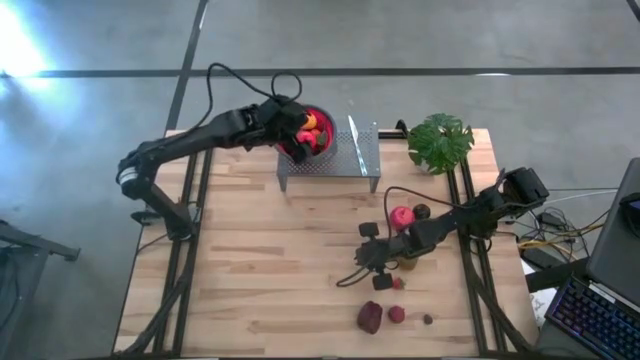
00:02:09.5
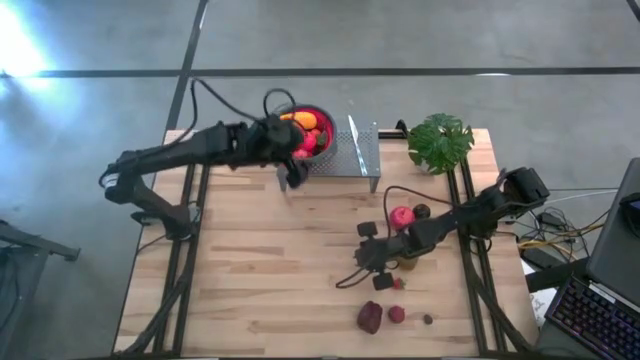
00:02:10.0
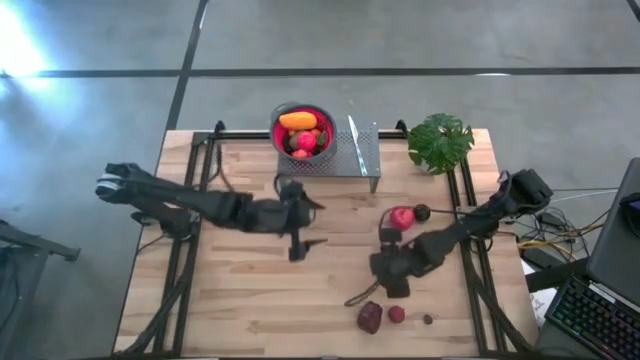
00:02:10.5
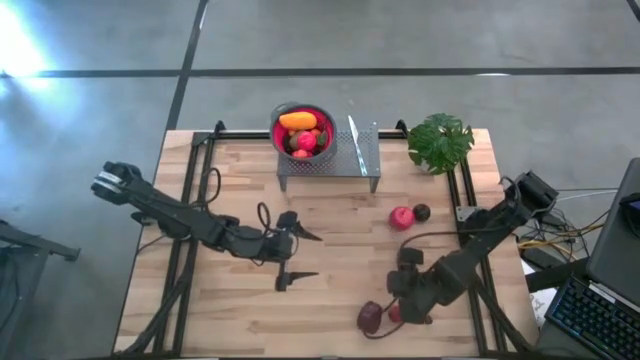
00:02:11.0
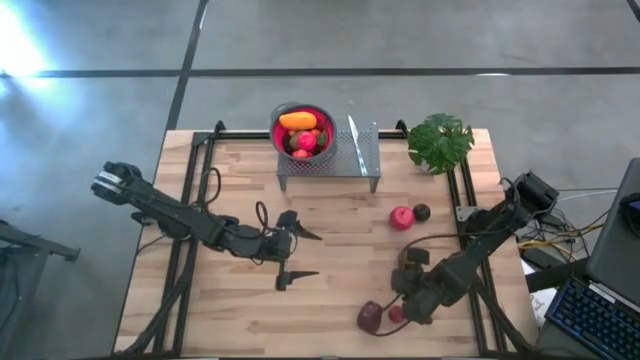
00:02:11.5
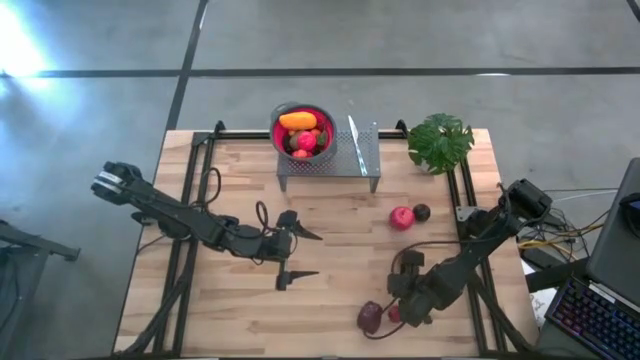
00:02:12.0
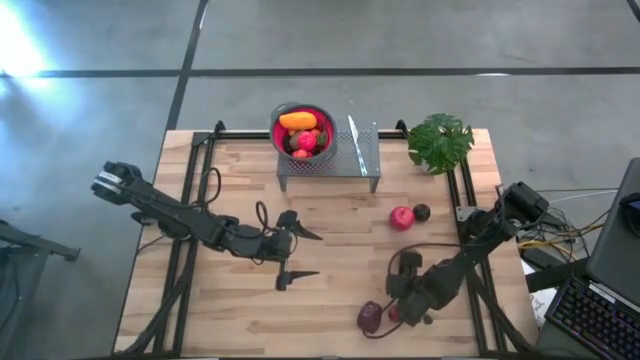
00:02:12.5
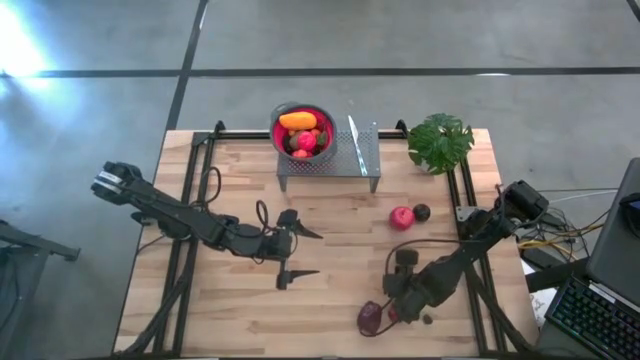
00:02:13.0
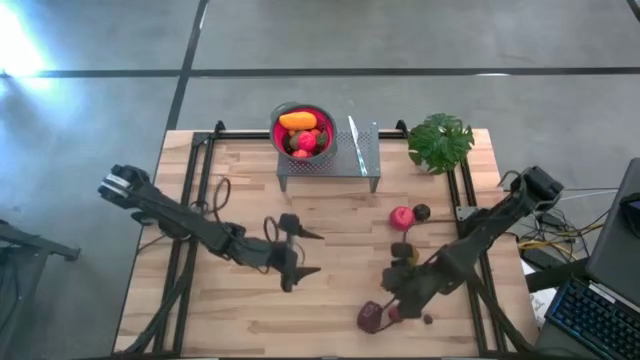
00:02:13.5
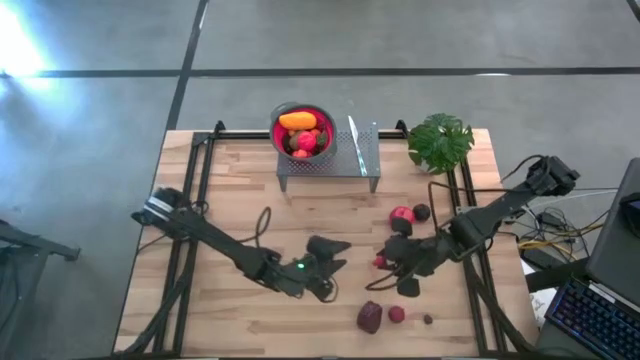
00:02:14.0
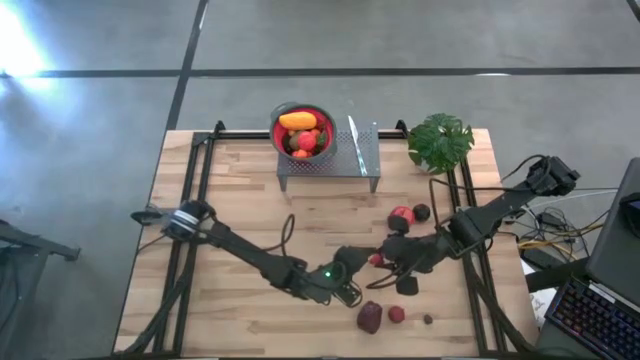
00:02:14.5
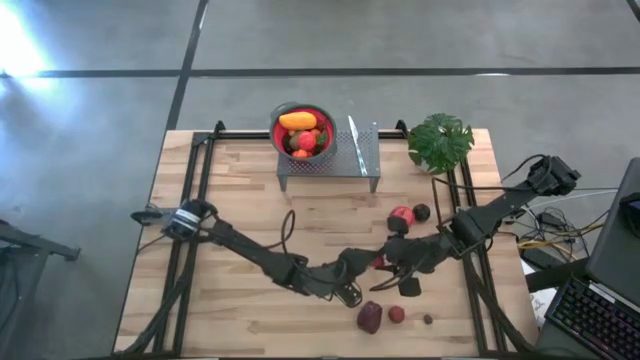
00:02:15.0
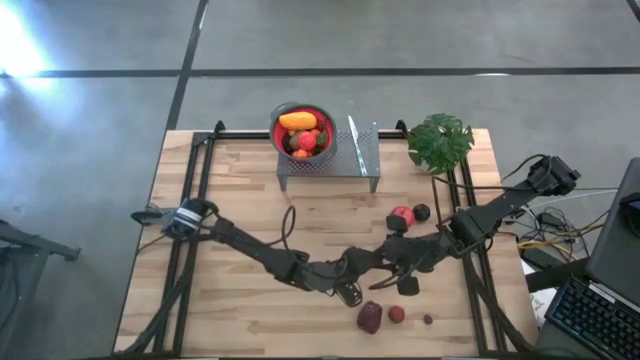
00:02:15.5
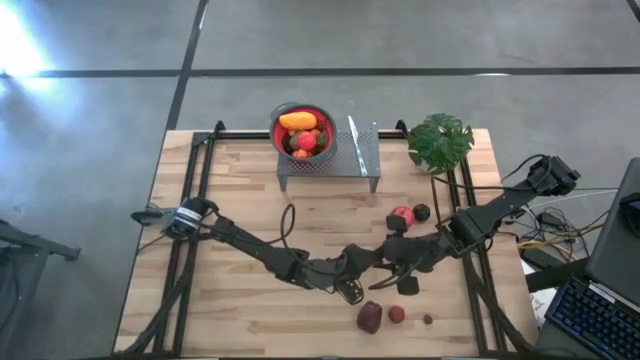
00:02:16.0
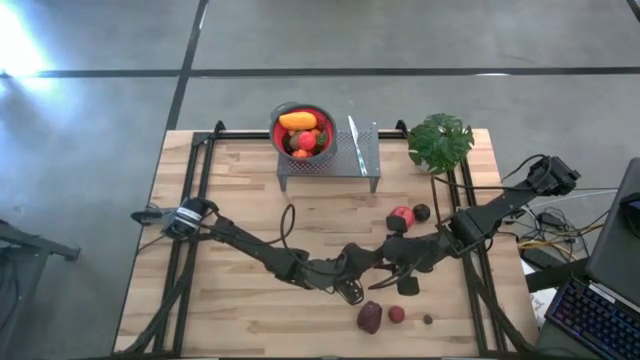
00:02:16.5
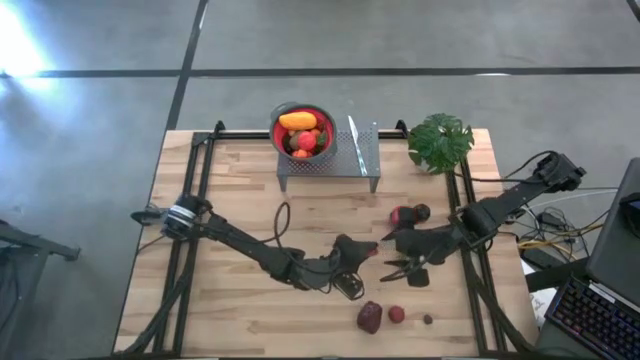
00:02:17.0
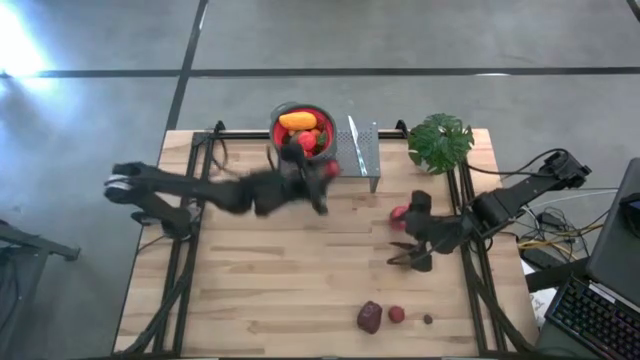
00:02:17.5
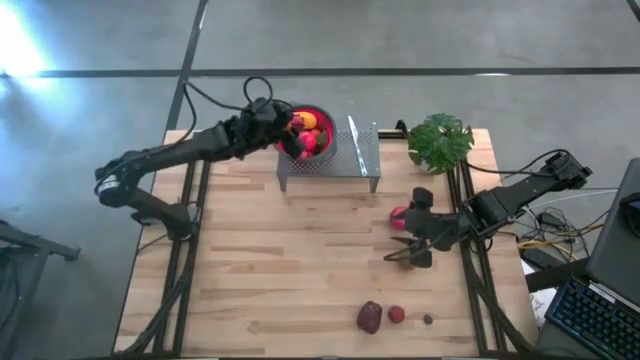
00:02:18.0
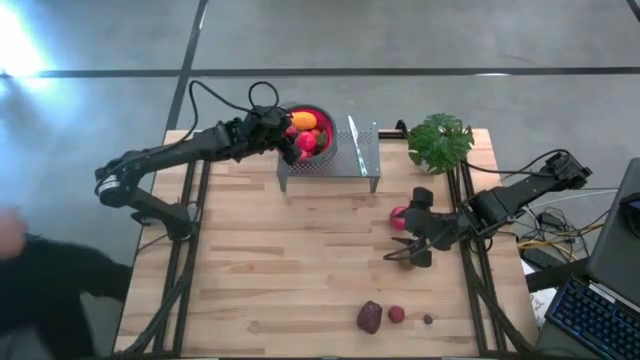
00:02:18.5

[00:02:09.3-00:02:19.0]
Task: Pick & Place Fruit
Put the red strawberry into the red strainer bowl on the shelf

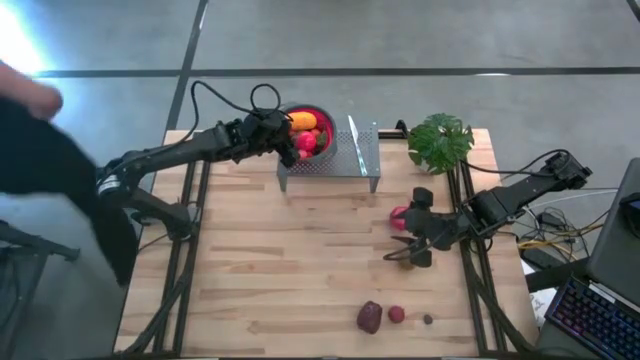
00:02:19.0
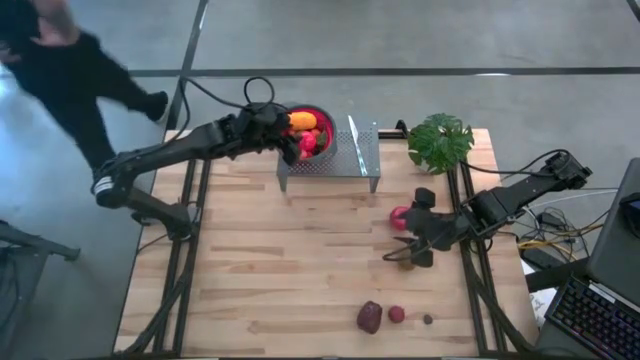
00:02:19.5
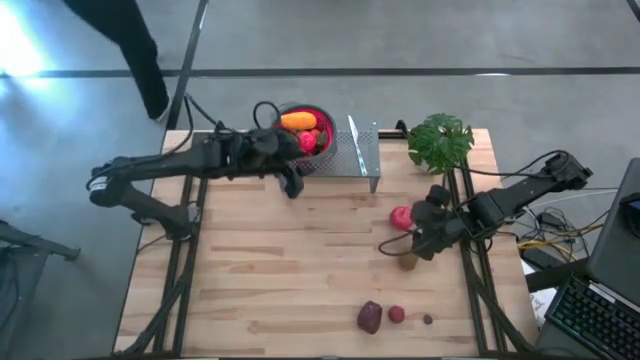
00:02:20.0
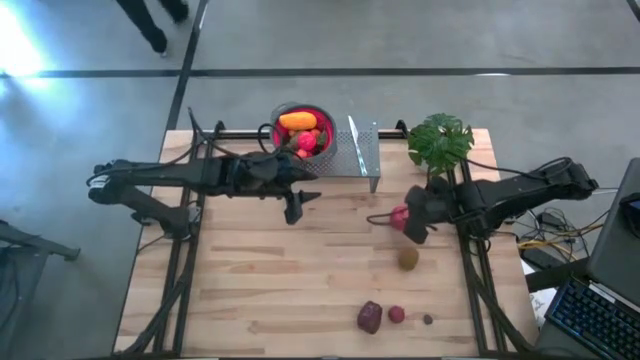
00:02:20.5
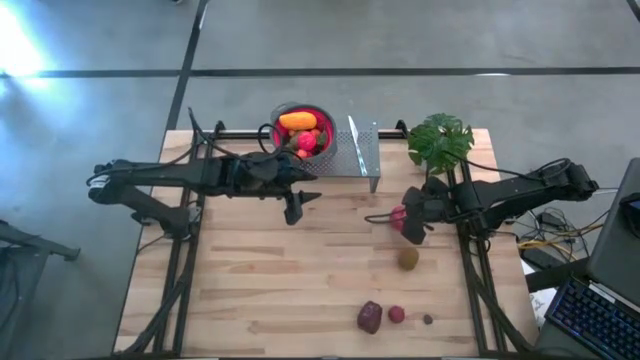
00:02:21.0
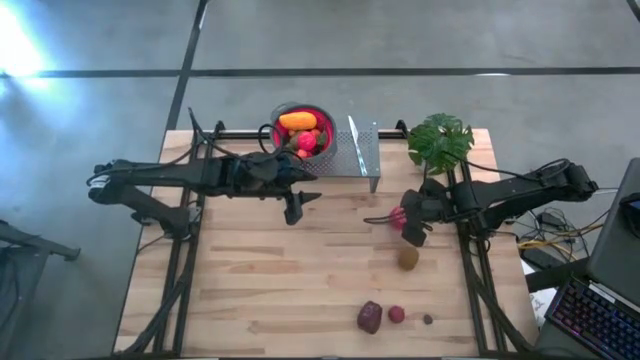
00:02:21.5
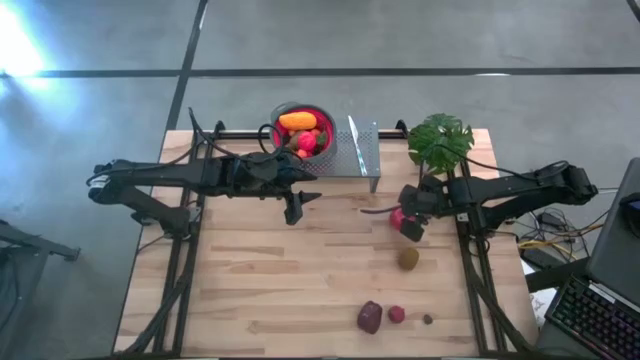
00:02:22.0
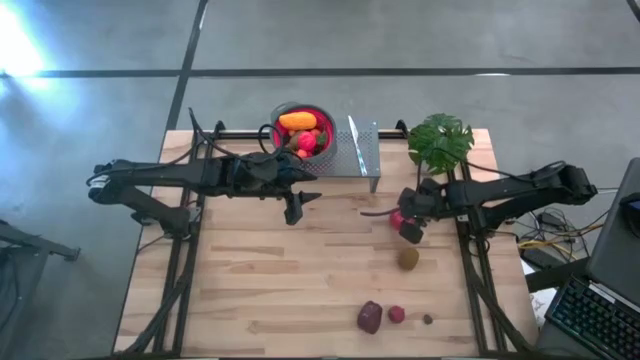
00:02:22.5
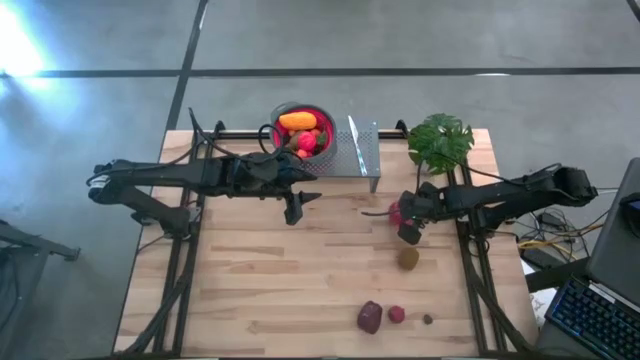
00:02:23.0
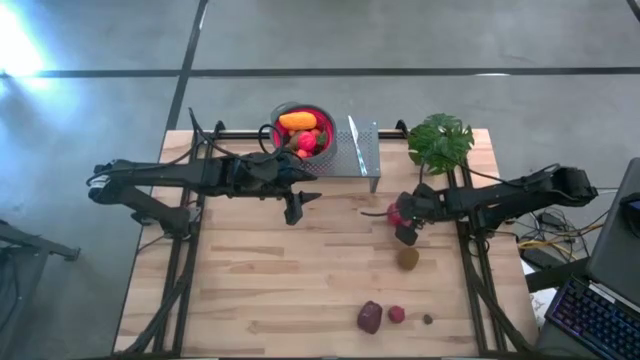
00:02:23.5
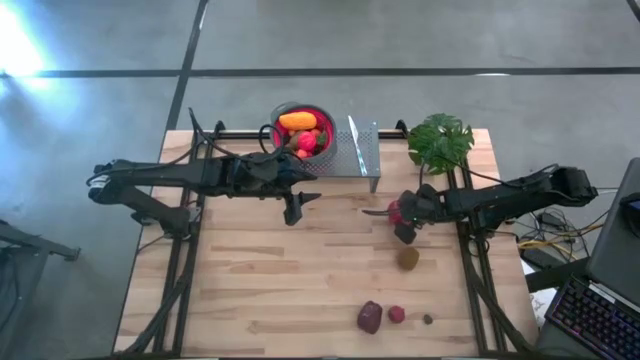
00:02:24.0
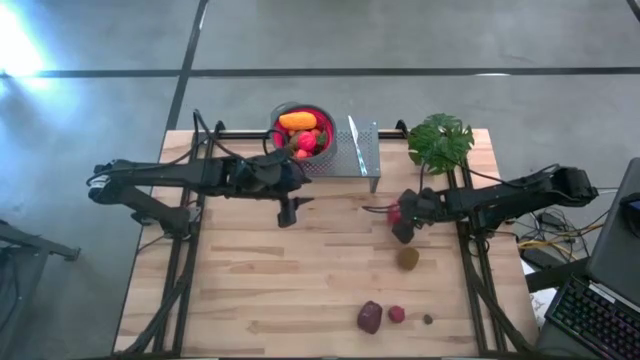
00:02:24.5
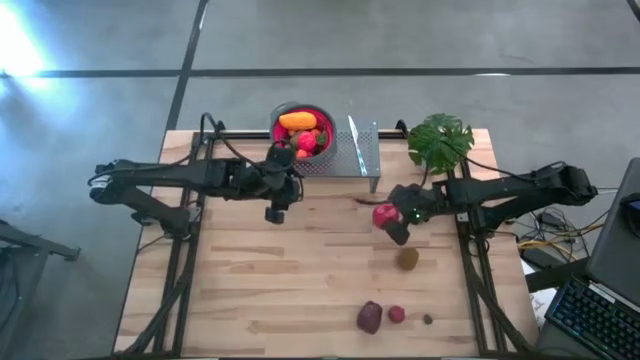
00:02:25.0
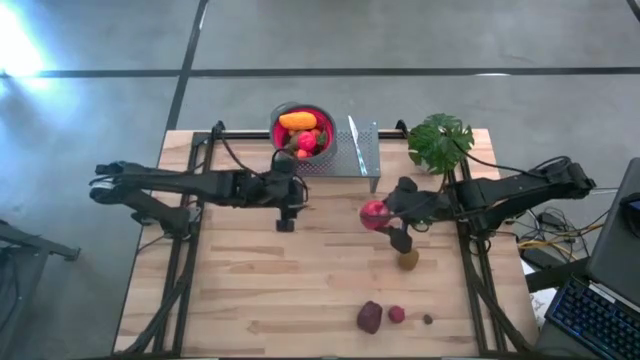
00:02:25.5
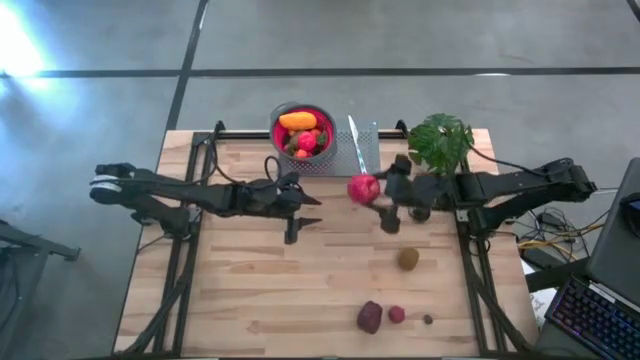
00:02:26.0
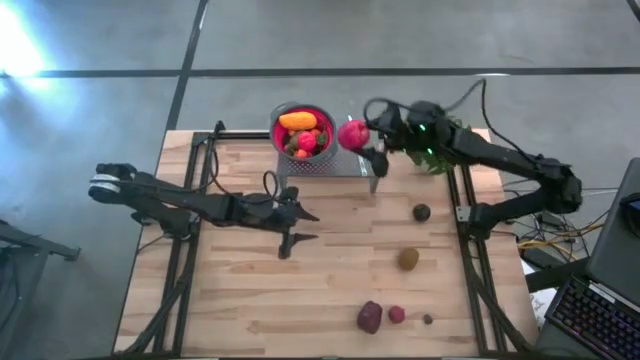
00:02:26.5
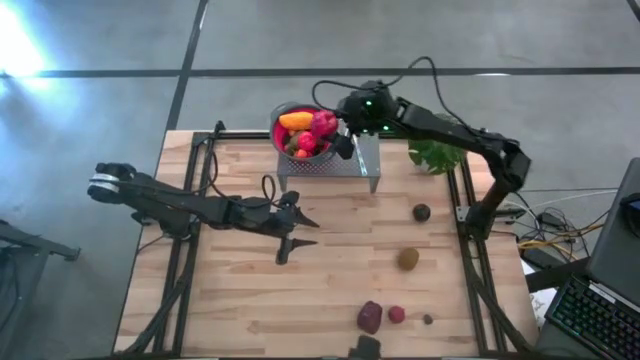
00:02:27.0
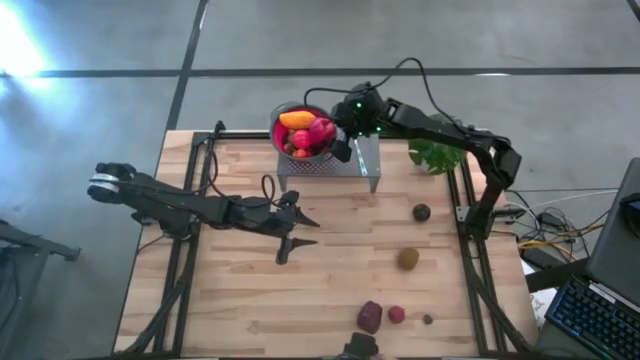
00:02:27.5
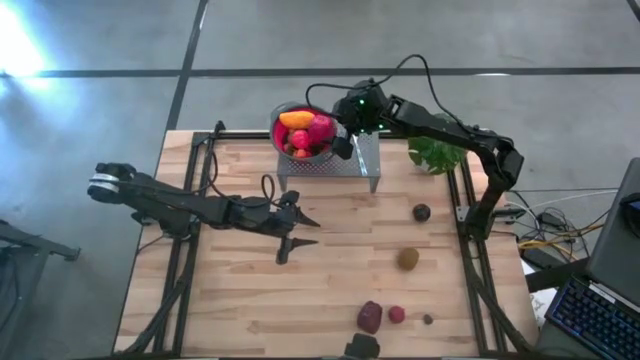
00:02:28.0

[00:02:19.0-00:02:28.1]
Put the red apple into the red strainer bowl on the shelf

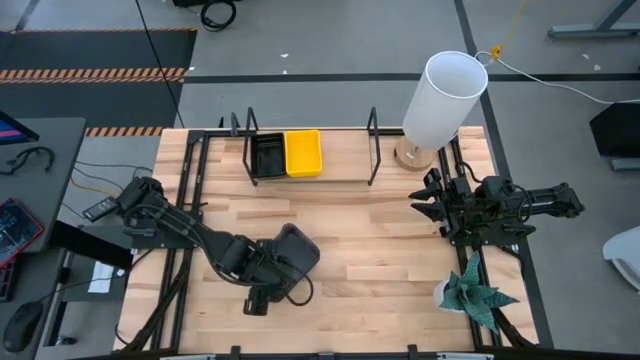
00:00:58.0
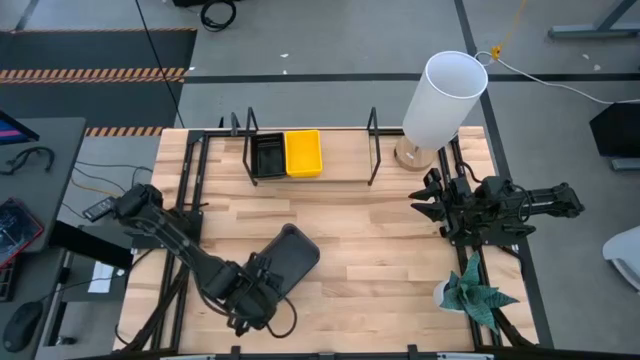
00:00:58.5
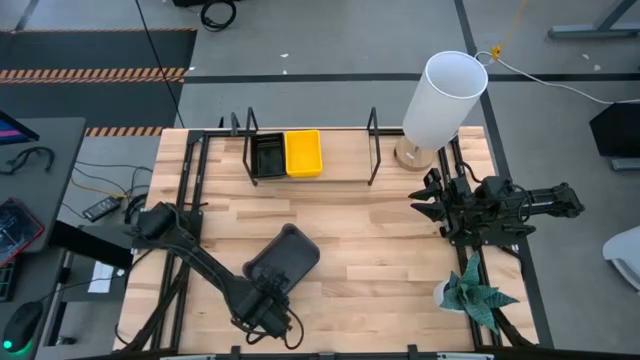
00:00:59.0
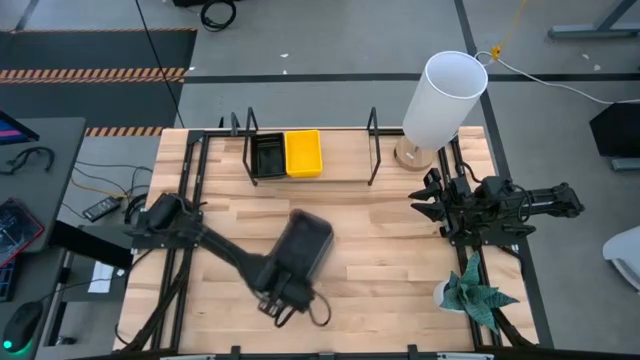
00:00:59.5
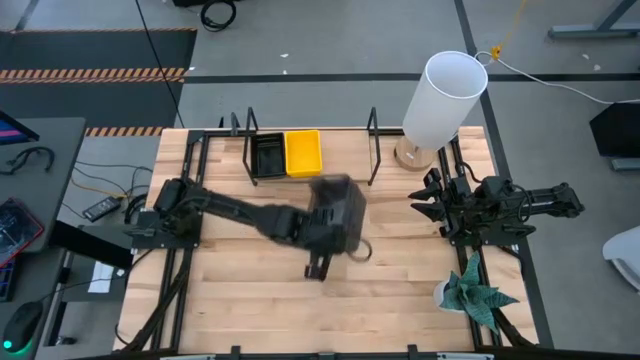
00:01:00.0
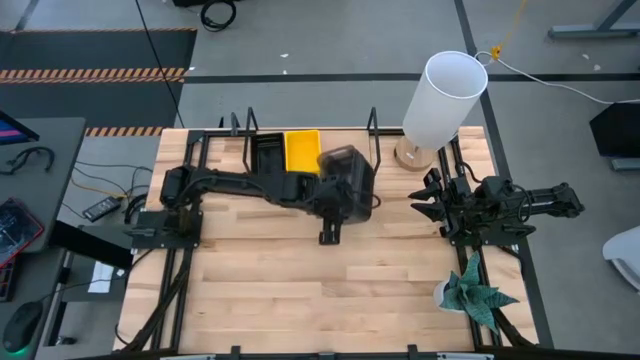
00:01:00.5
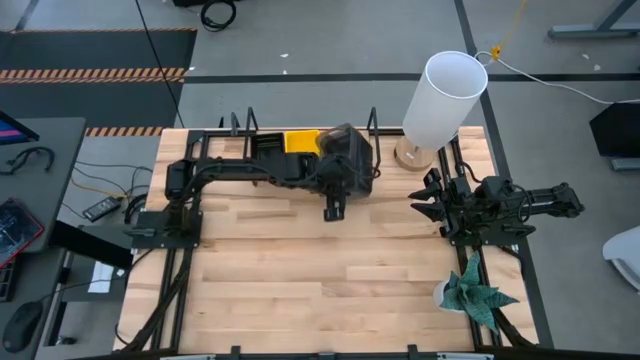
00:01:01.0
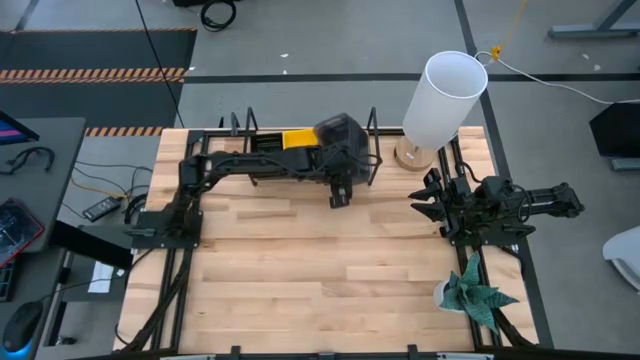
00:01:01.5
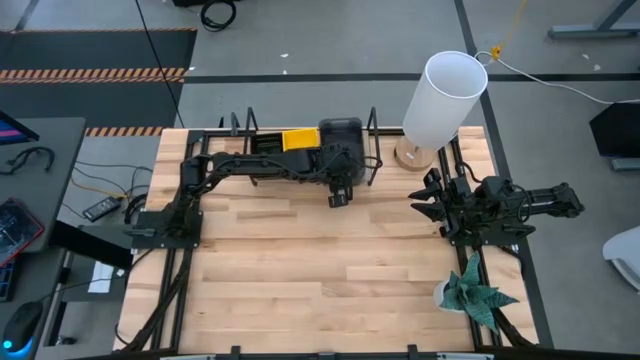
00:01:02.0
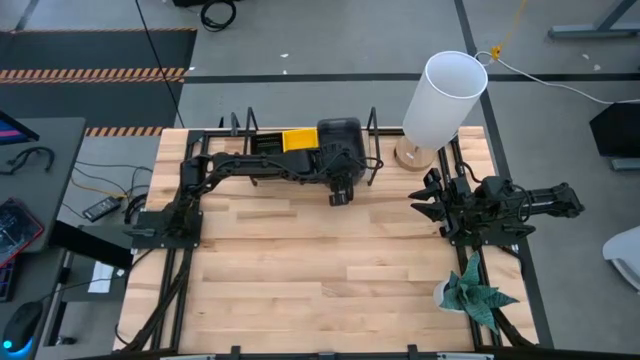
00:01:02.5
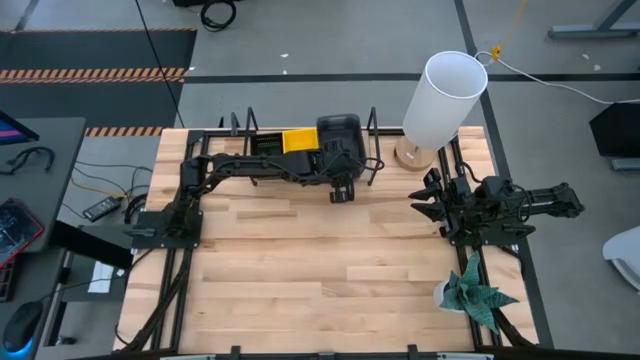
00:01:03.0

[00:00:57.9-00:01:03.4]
Task: Stack baskets on shelf by color
Put the stack of black bins on the shelf
